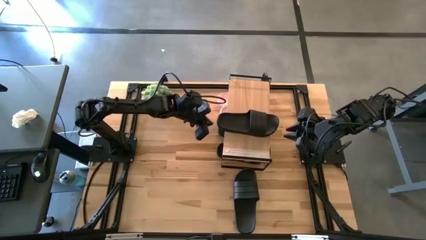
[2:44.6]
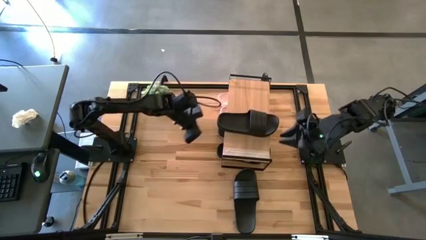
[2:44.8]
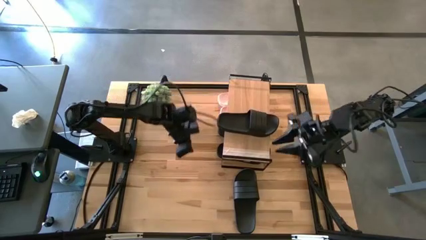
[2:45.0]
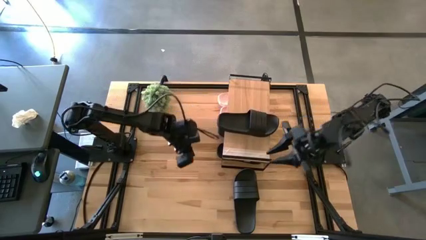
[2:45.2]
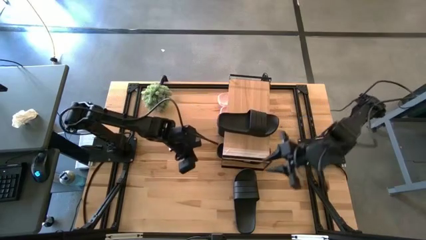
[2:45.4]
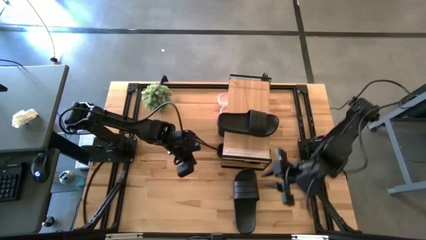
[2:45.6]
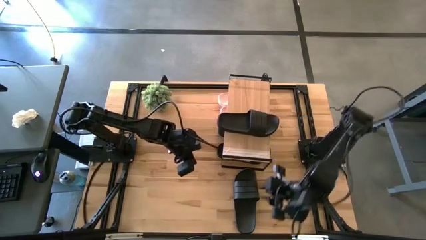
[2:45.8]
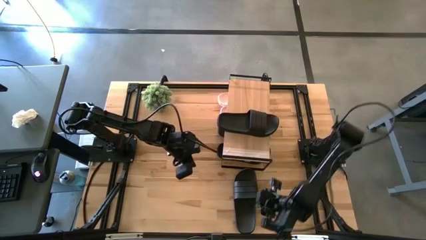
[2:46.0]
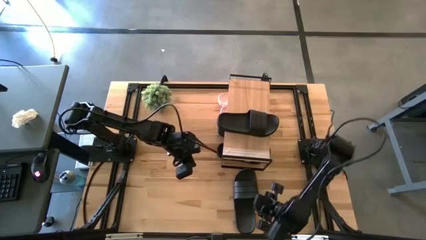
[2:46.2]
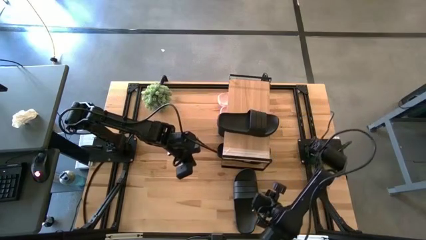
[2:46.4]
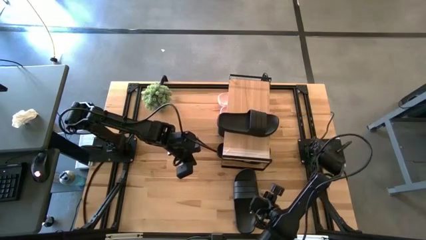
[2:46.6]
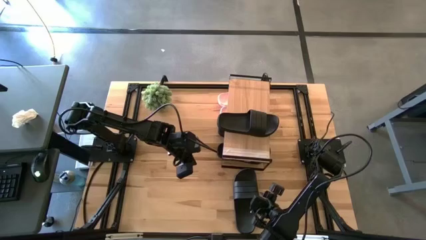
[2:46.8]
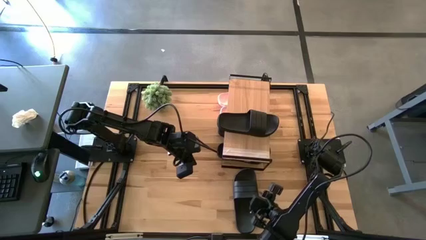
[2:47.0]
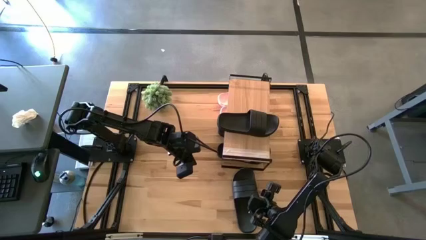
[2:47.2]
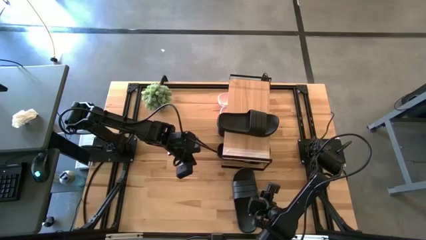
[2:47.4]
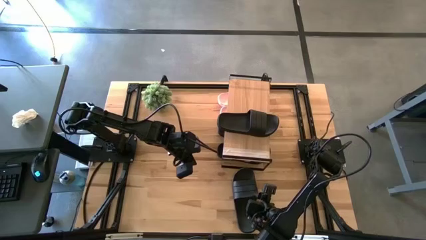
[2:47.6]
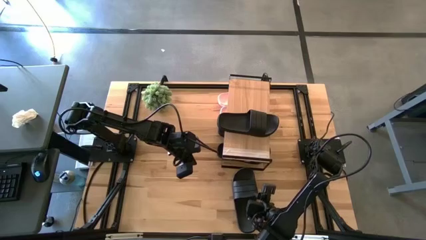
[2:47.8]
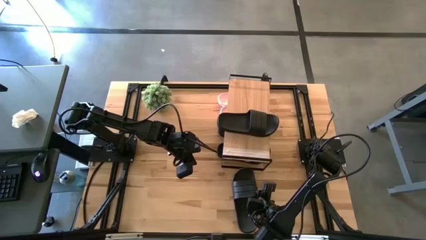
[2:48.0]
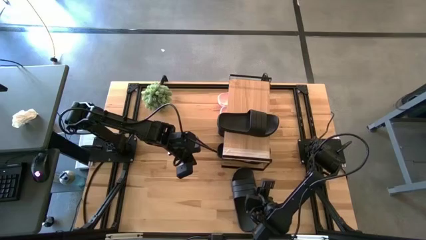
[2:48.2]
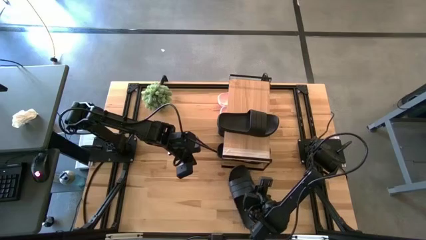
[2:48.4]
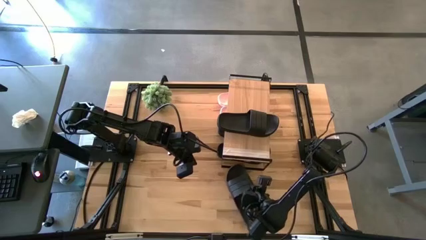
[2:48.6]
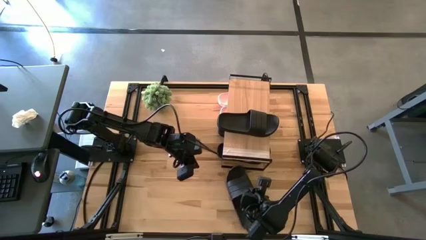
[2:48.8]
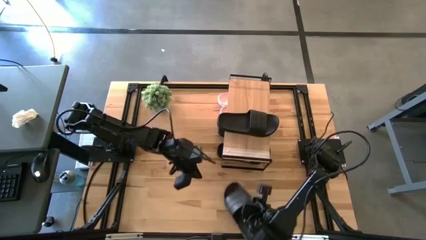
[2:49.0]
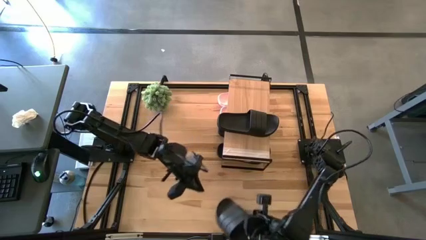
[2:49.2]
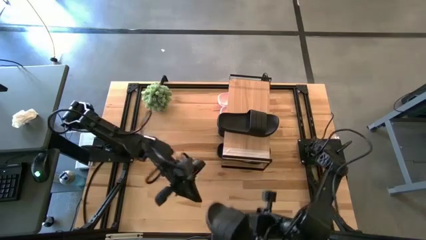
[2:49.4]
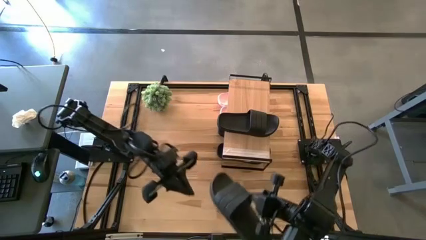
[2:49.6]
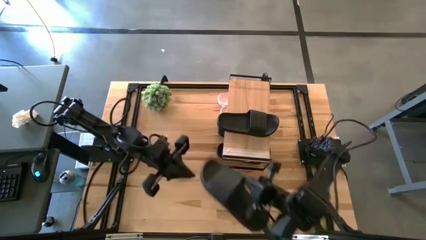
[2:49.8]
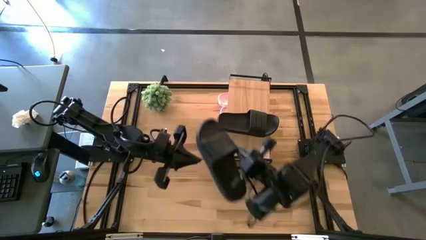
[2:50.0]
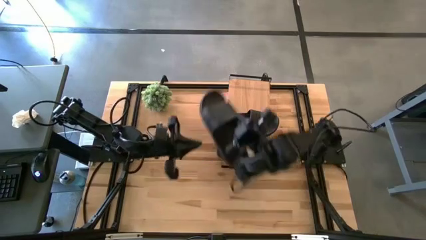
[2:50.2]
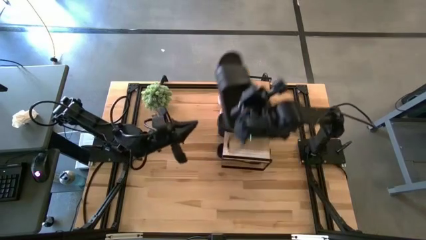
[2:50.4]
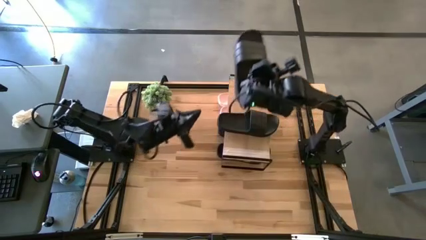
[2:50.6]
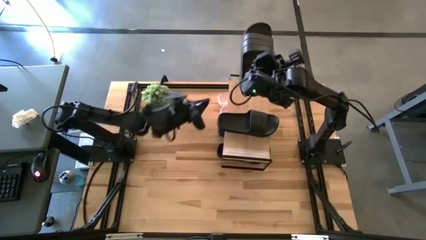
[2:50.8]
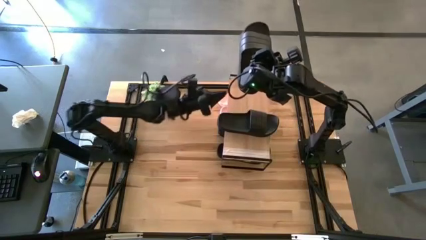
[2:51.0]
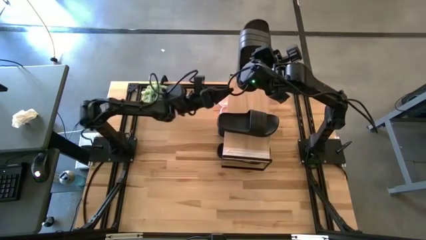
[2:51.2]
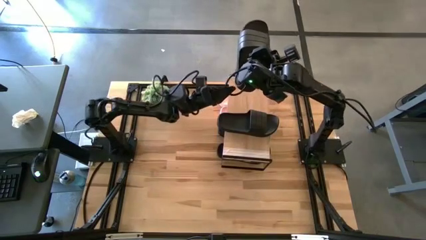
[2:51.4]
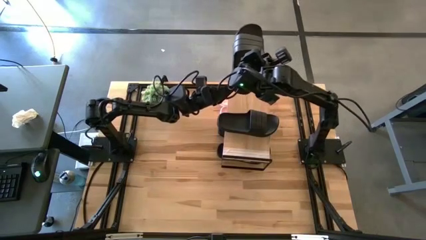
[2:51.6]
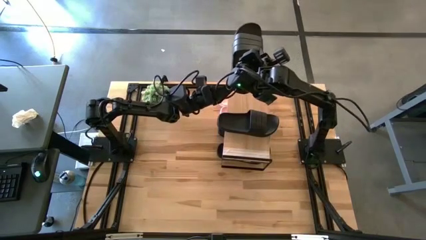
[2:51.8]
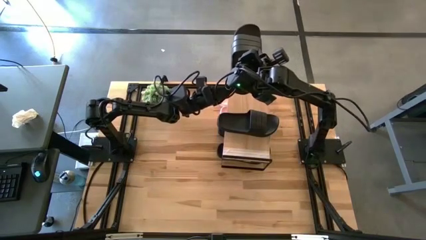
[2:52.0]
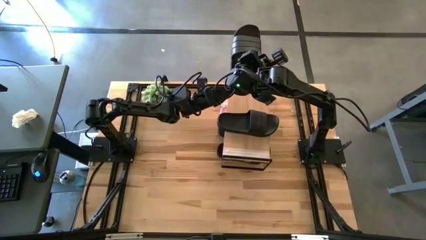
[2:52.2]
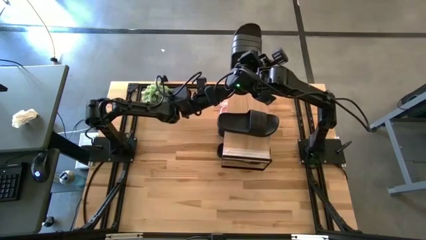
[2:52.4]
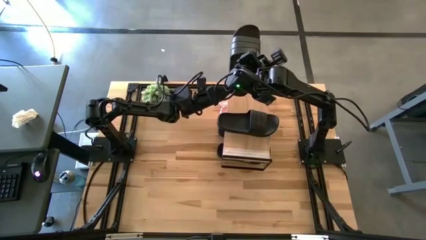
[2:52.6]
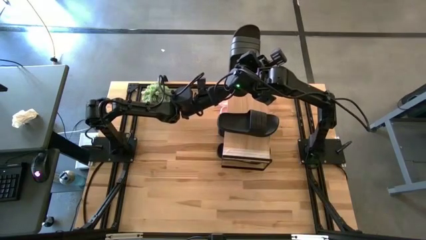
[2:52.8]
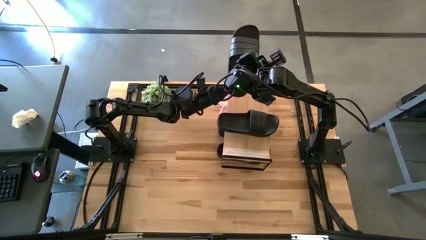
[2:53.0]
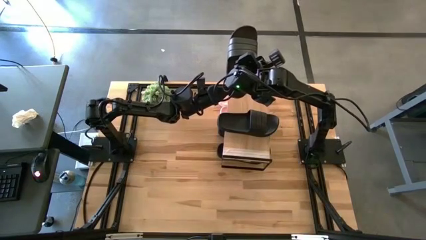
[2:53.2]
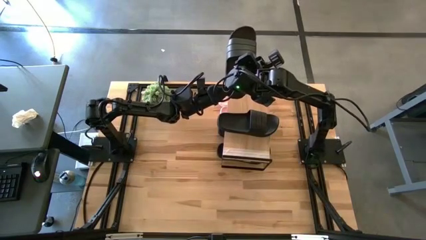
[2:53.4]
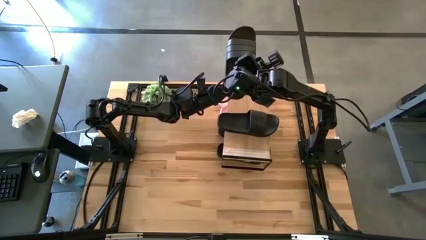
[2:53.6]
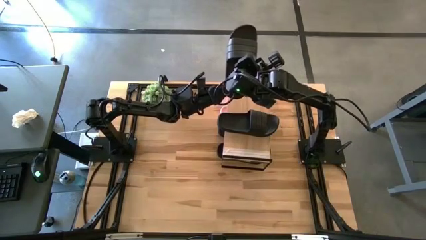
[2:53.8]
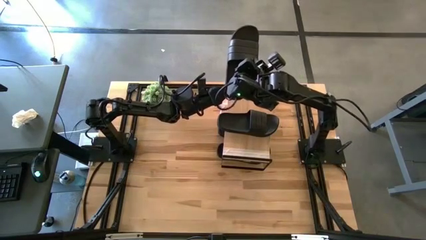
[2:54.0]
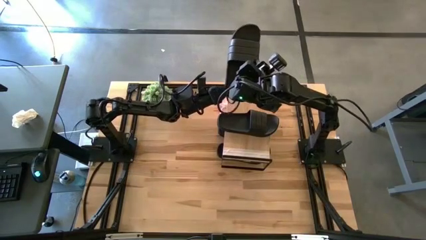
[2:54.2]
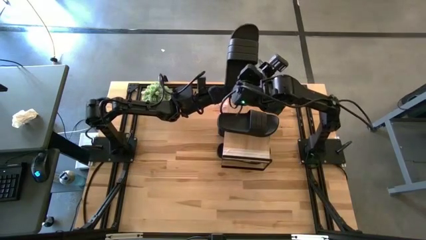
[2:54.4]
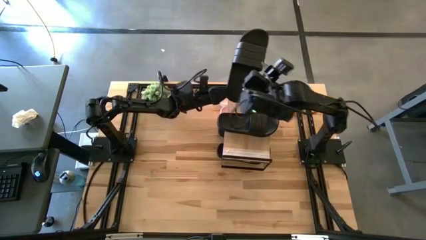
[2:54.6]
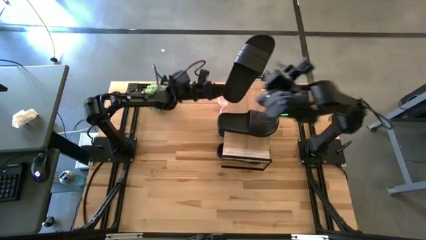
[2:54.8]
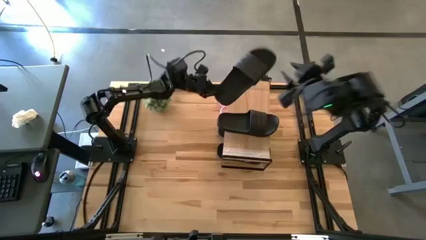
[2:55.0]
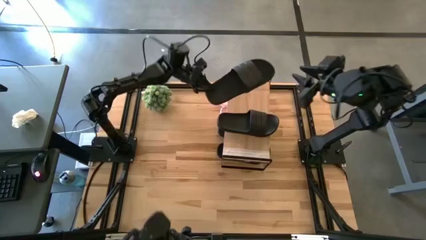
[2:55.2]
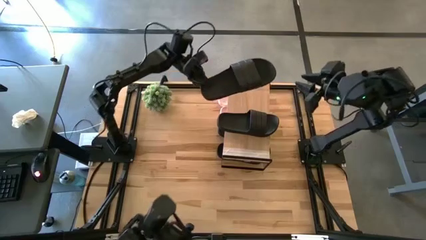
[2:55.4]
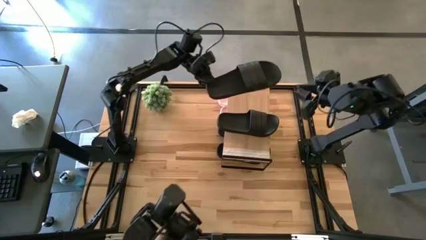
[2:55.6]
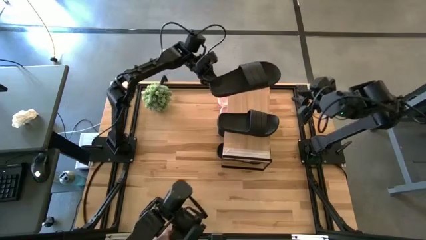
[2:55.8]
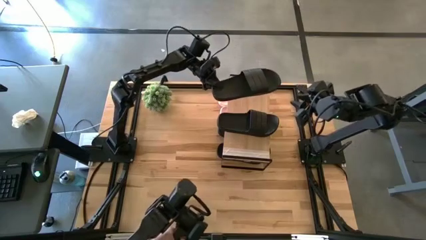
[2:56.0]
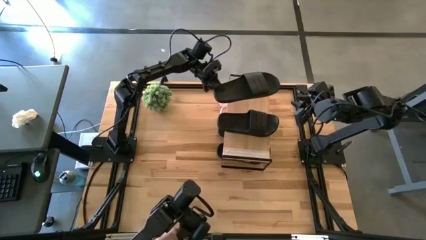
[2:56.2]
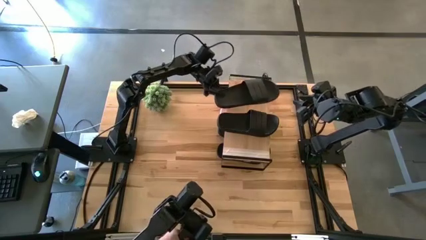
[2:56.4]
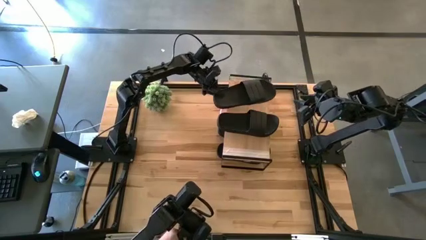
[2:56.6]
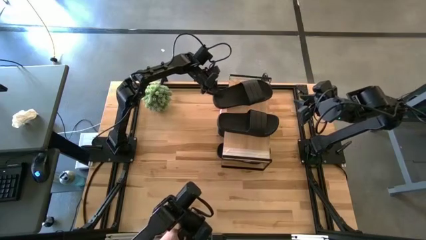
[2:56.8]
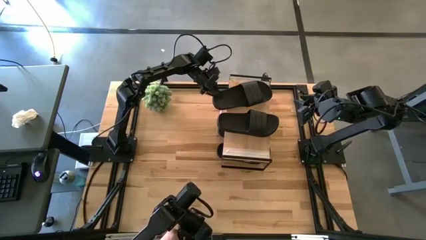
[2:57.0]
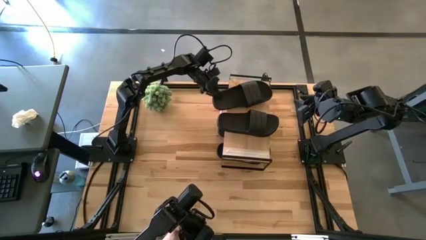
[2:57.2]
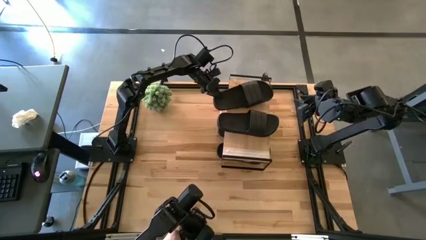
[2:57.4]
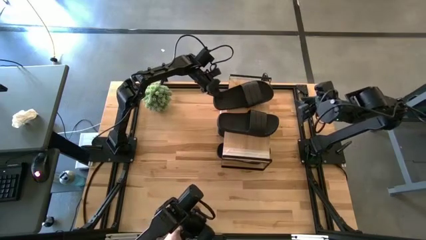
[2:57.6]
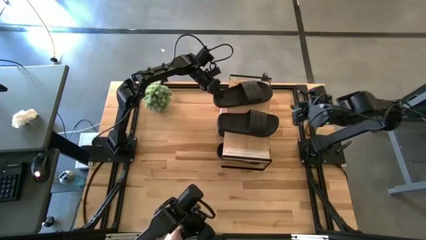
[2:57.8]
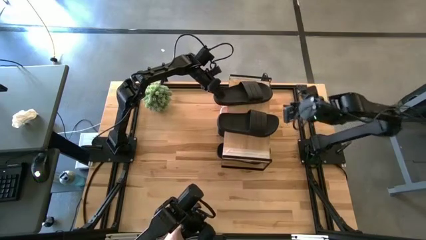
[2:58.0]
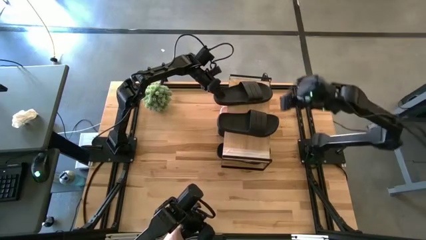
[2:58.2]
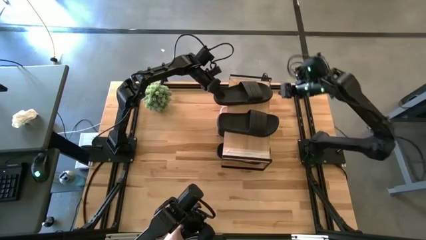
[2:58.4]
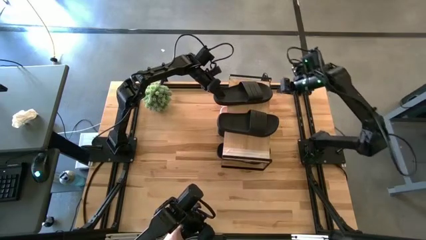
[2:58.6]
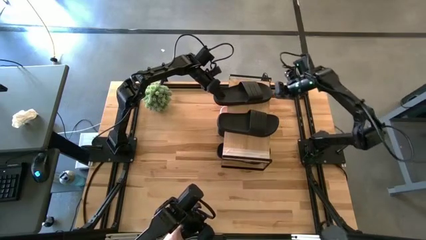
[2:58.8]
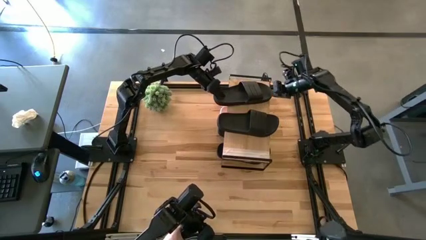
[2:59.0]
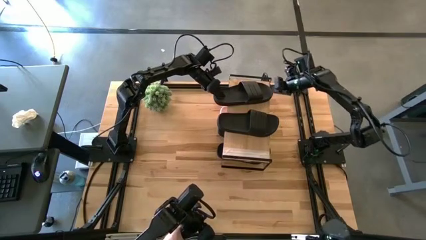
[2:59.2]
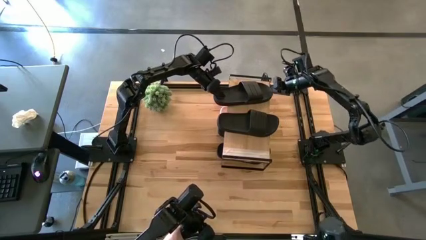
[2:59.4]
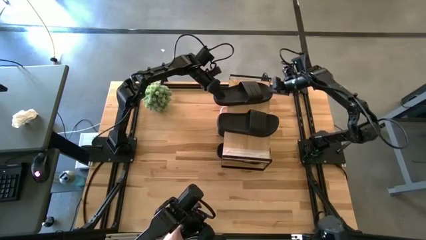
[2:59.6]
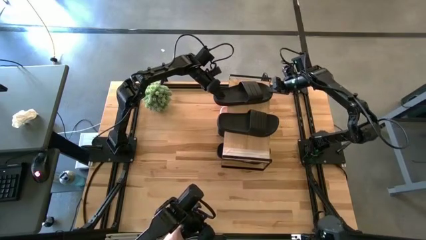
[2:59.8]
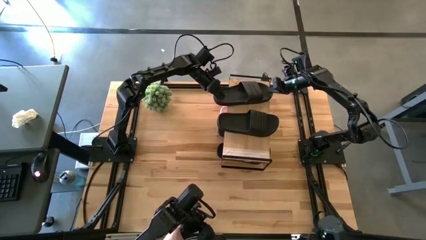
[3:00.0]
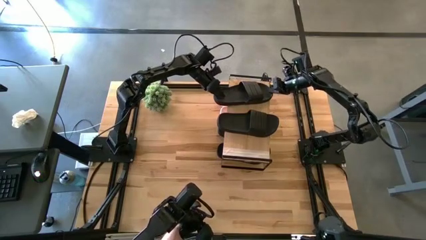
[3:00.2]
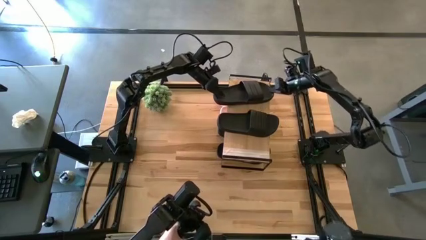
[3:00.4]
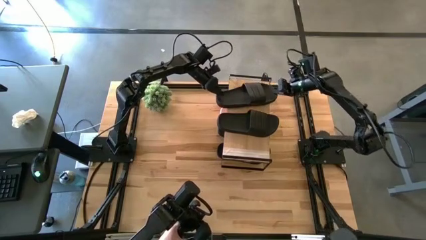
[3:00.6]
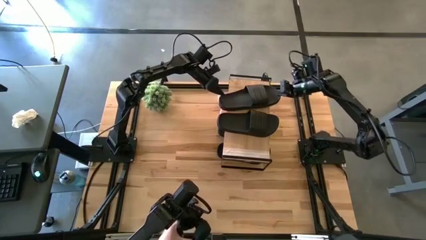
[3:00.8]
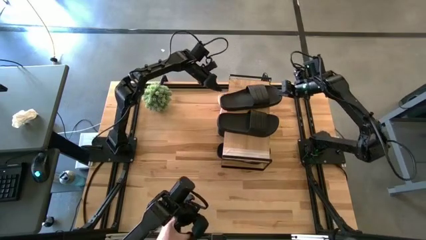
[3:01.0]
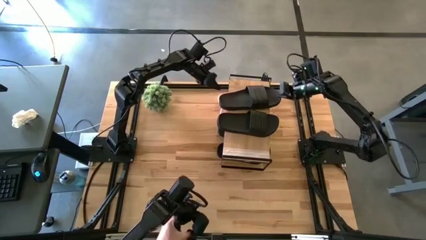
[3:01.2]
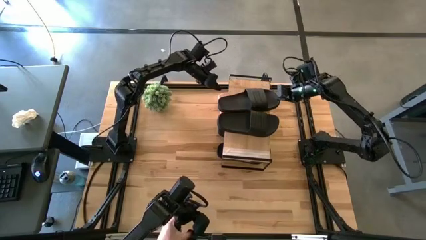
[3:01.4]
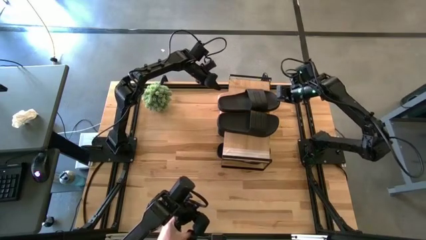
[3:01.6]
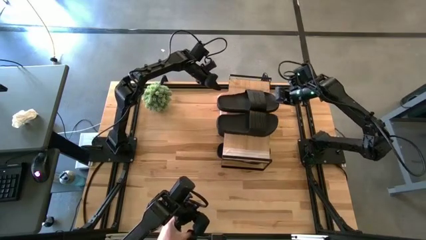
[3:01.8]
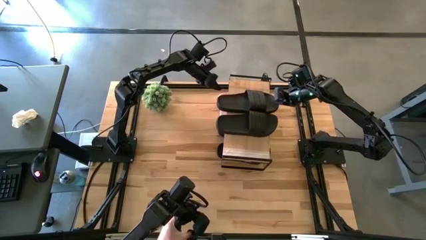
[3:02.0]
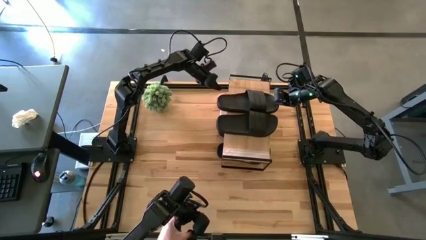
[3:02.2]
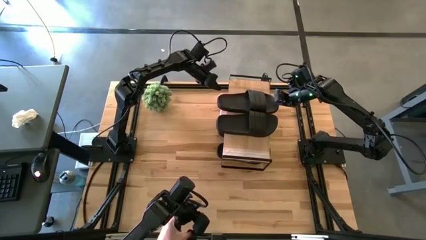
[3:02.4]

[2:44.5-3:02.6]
Task: Pick and place slides into the shelf
Put the black slipper on the shelf
